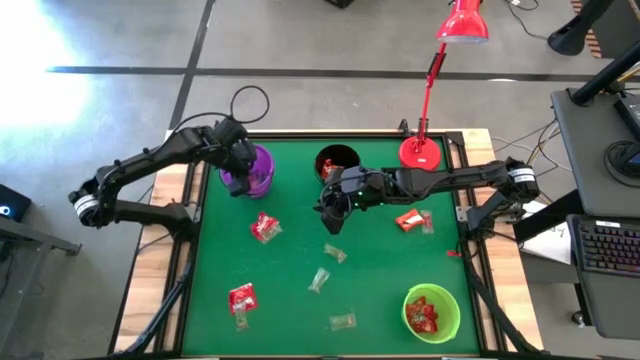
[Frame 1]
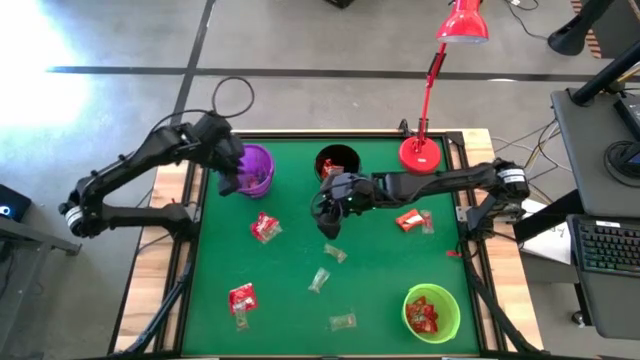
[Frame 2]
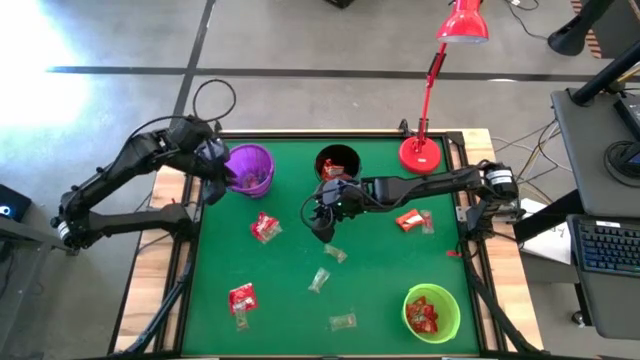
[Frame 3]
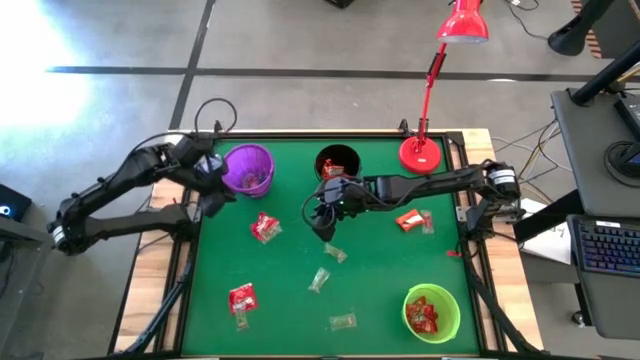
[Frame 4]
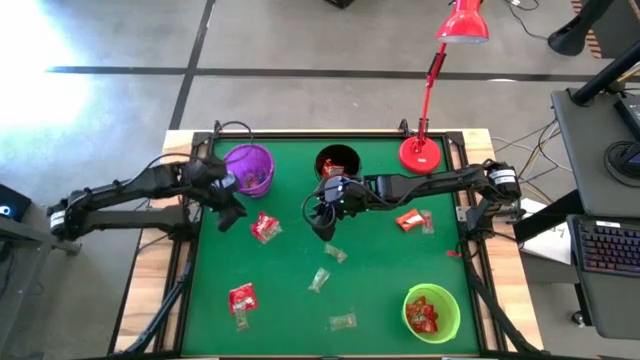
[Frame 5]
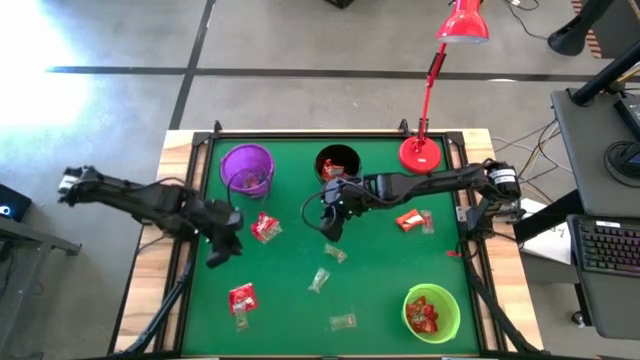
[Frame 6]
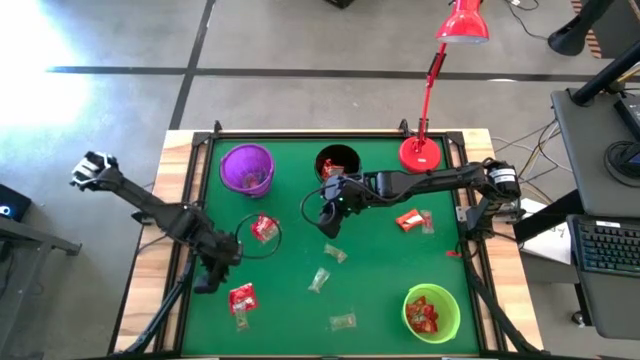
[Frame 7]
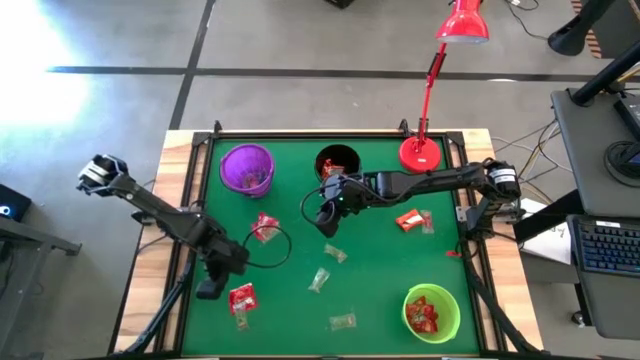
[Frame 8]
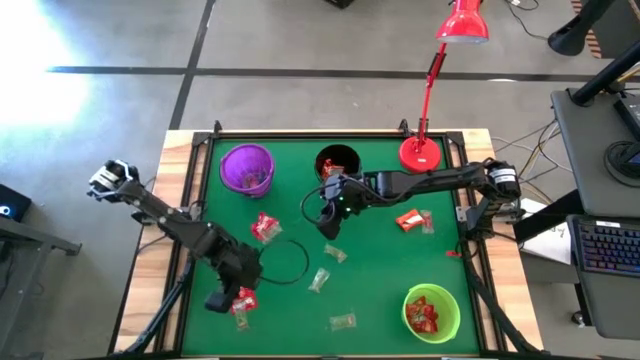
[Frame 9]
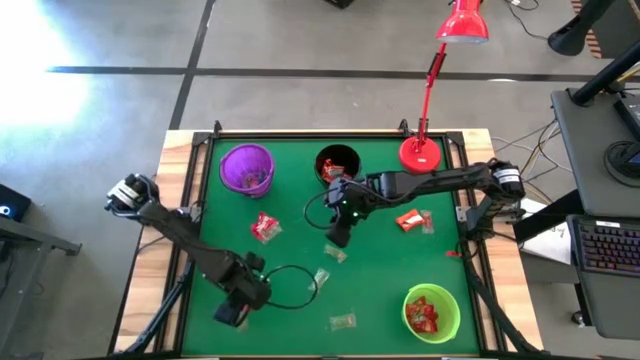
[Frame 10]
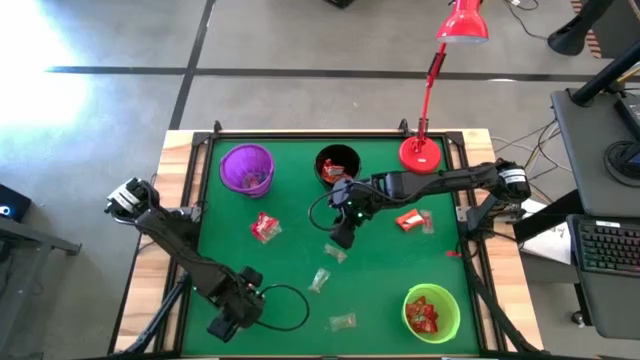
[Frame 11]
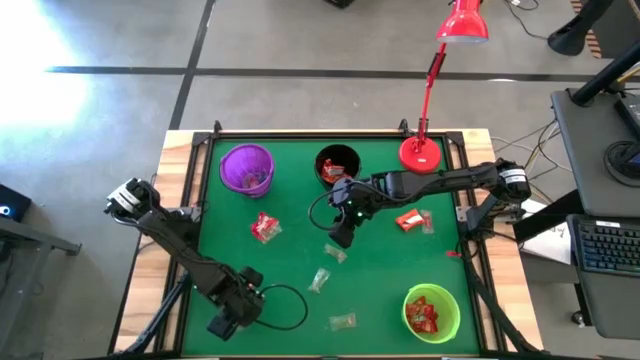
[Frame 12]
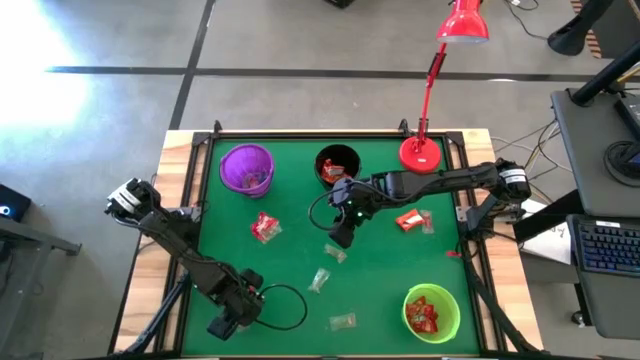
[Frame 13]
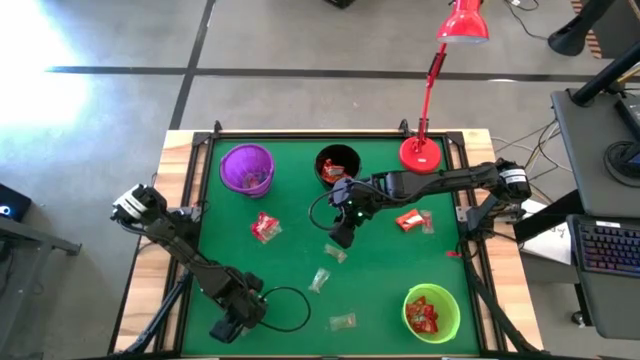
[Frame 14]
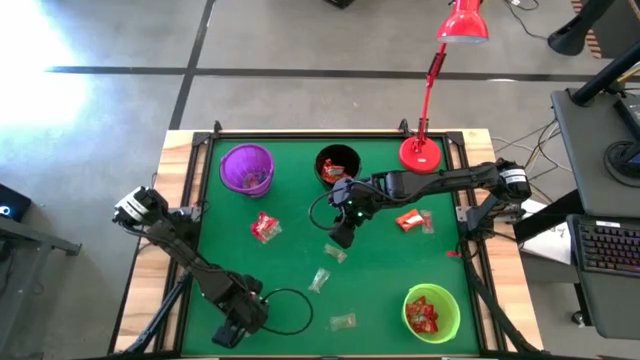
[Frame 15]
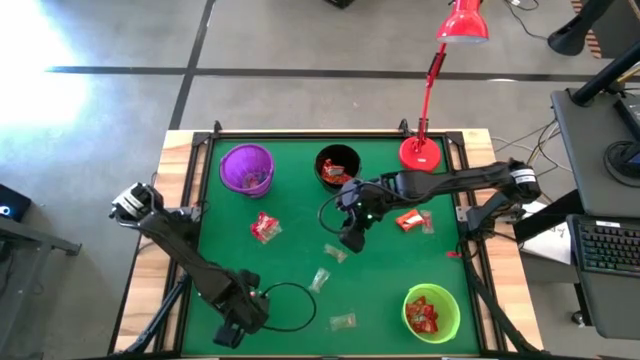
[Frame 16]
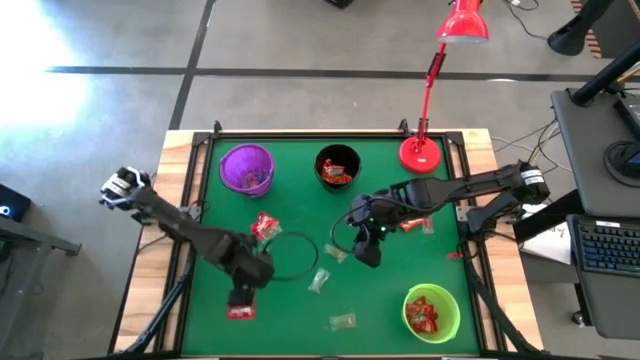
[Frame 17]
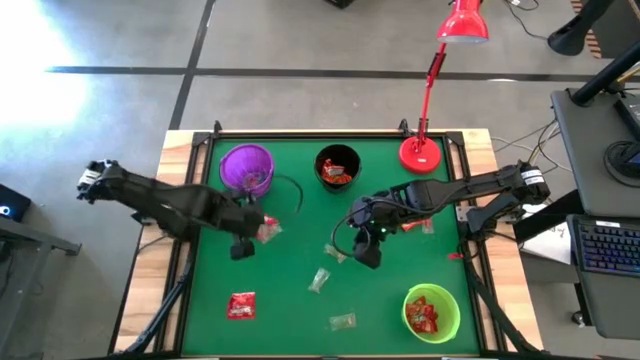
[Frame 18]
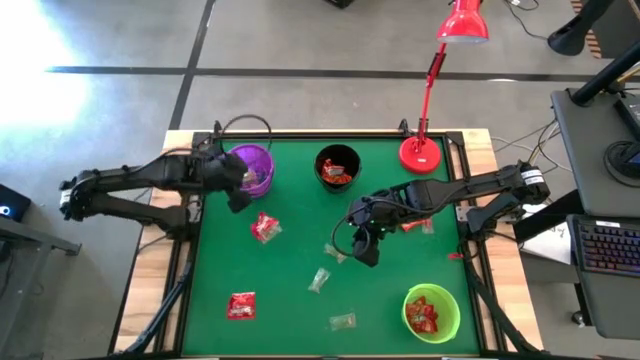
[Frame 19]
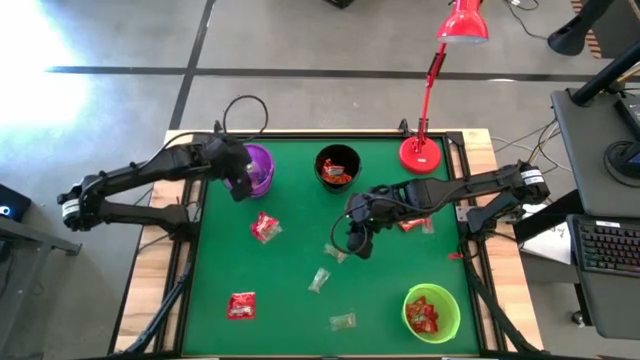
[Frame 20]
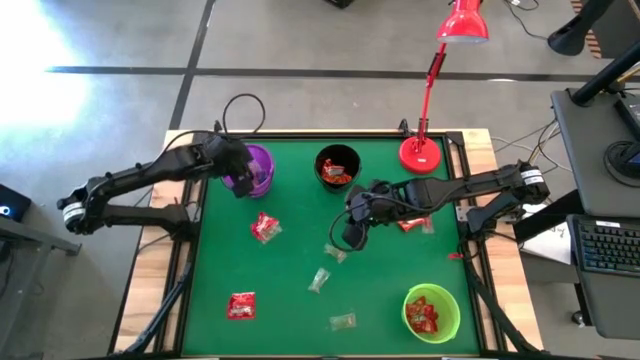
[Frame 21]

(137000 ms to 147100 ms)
Task: Sort candy
Put the green gummy into the violet bucket

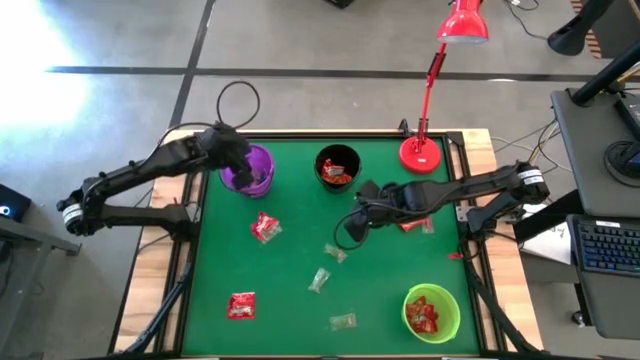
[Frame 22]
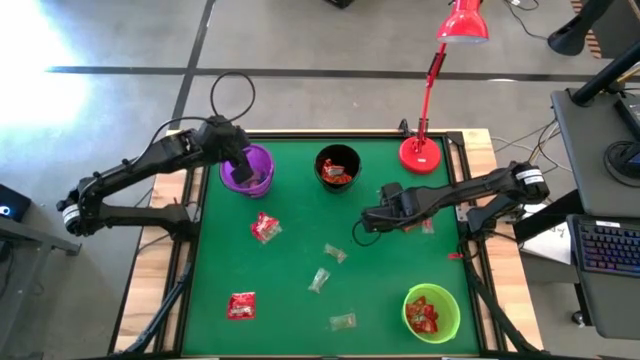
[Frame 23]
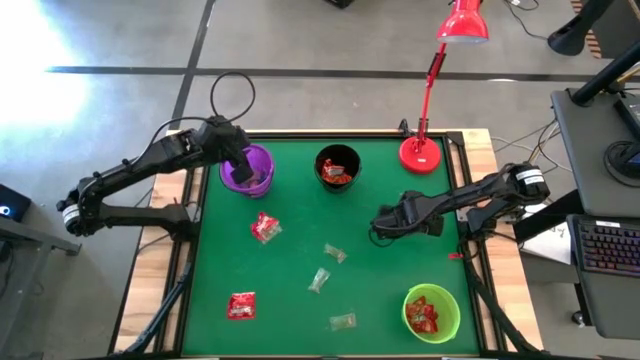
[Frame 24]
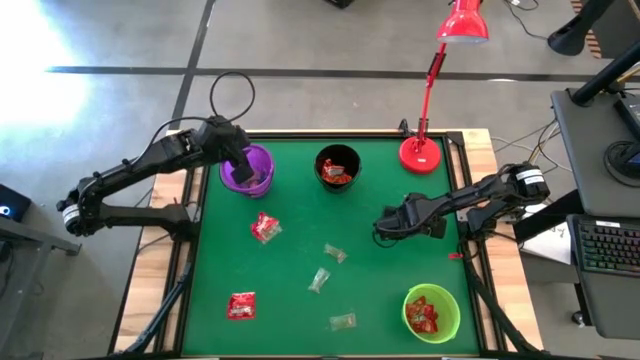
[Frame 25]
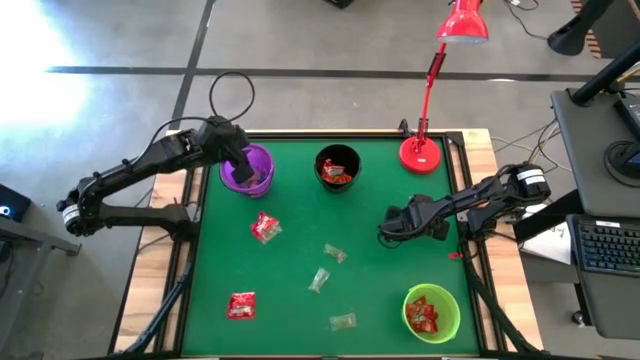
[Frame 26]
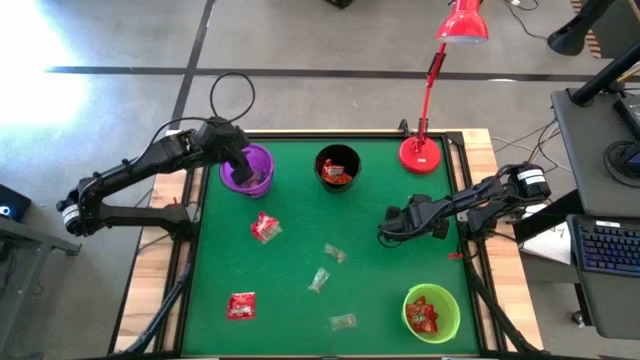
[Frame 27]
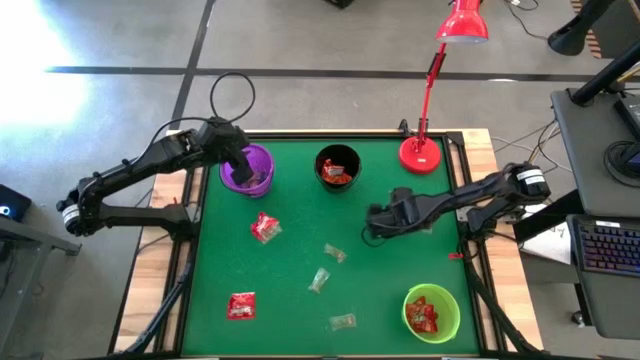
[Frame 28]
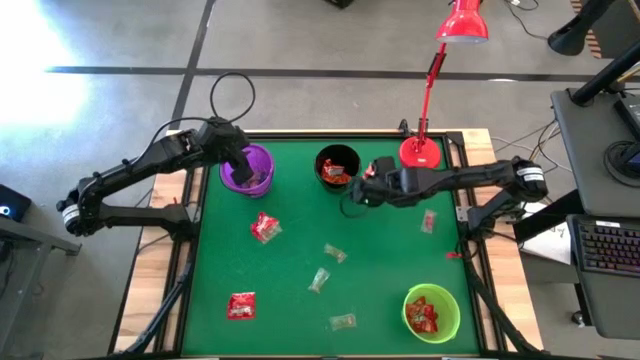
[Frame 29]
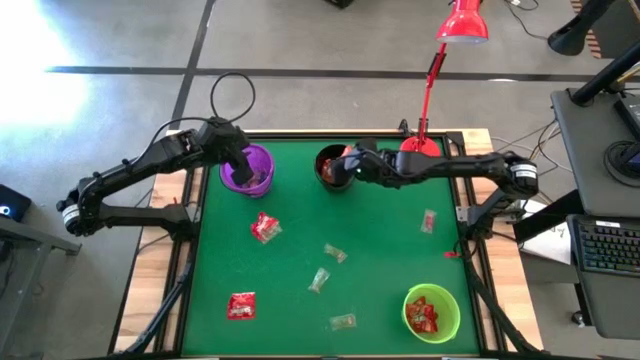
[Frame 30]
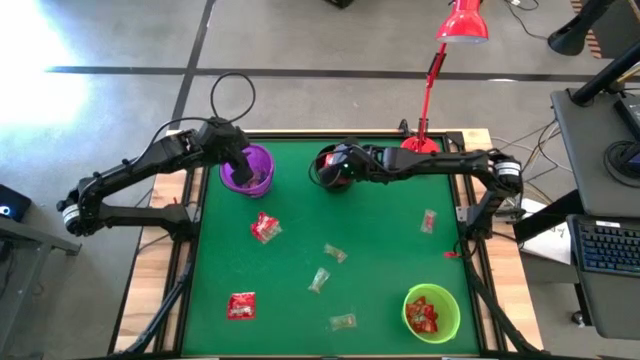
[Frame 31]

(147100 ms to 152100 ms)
Put the orange chocolate into the black bucket

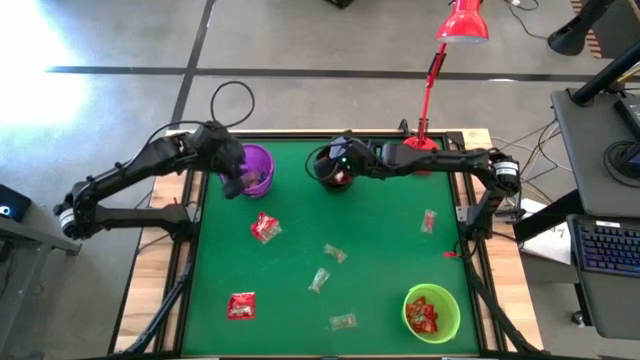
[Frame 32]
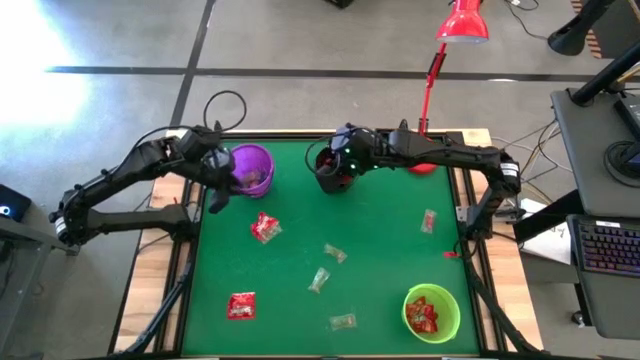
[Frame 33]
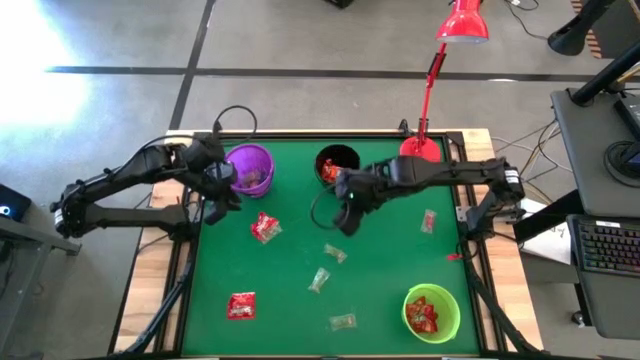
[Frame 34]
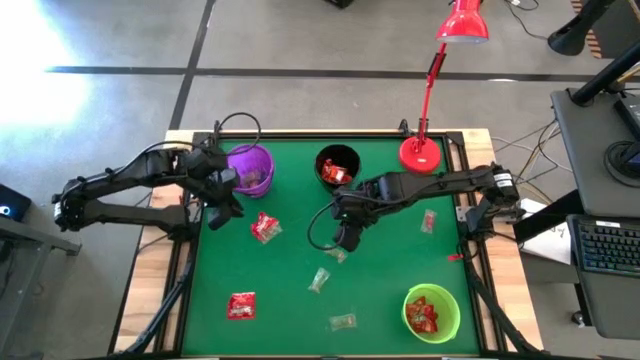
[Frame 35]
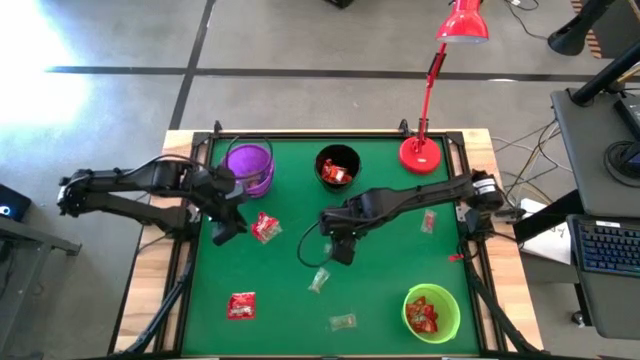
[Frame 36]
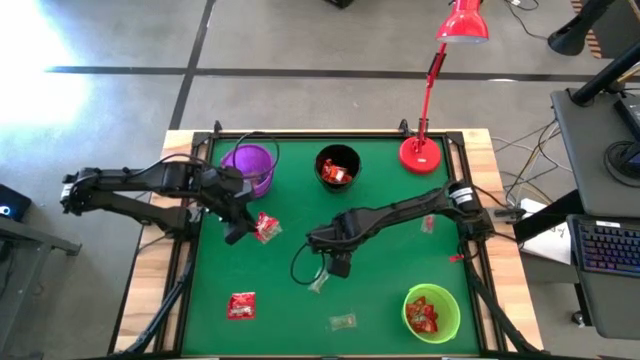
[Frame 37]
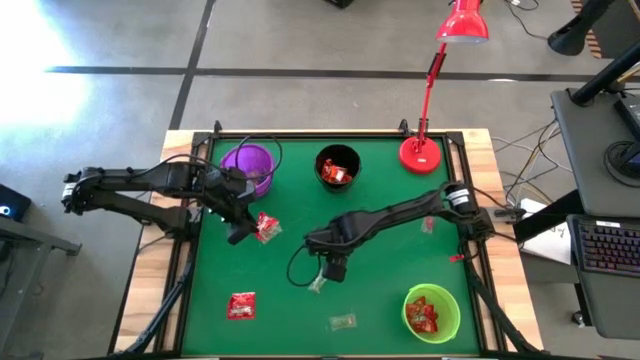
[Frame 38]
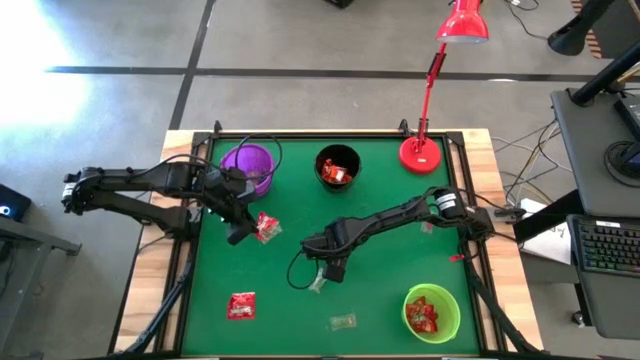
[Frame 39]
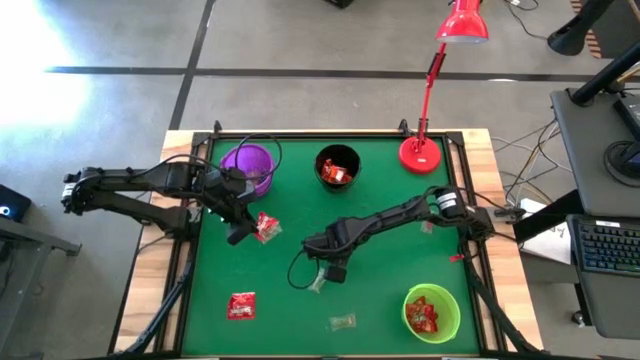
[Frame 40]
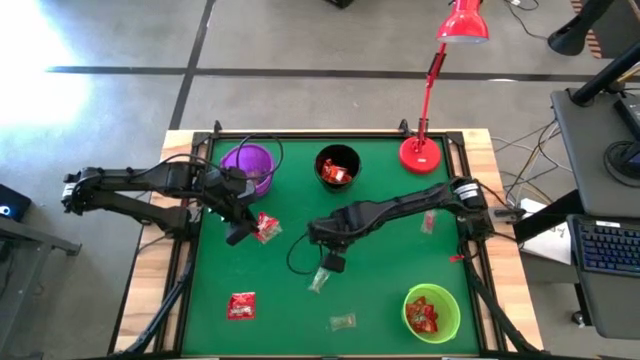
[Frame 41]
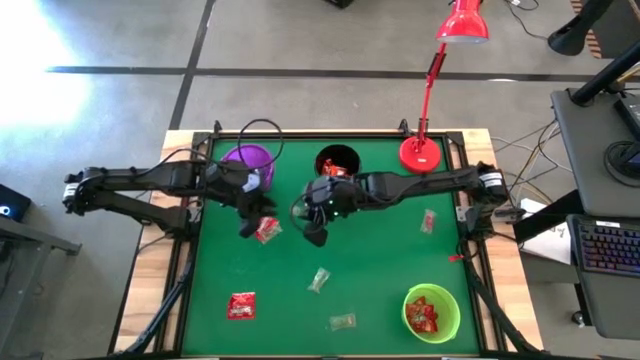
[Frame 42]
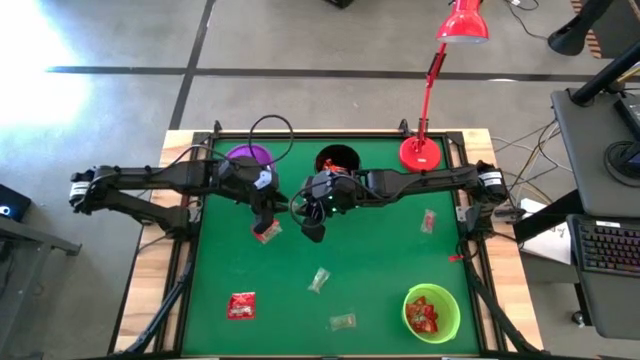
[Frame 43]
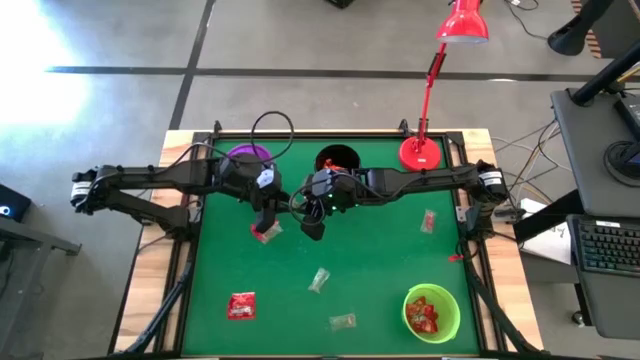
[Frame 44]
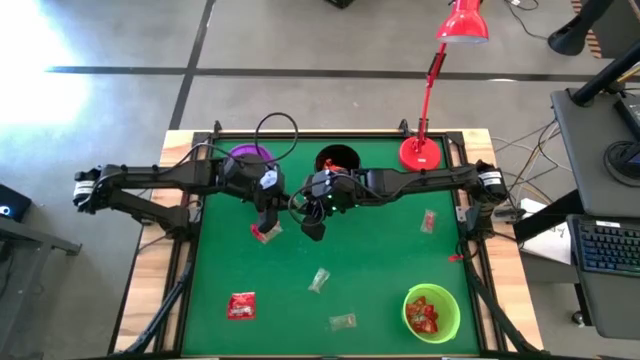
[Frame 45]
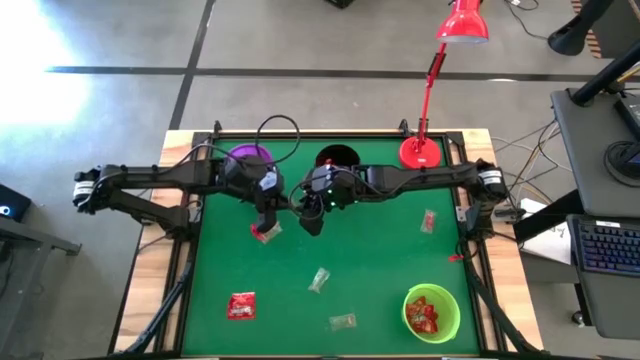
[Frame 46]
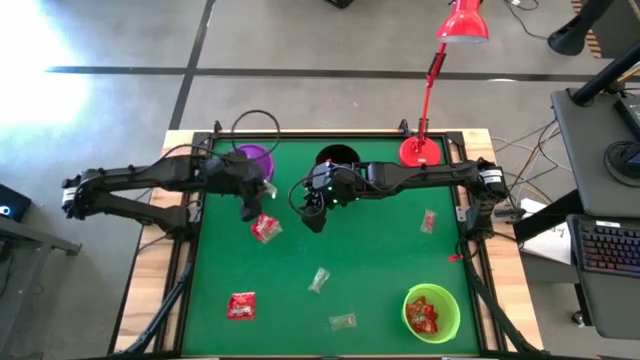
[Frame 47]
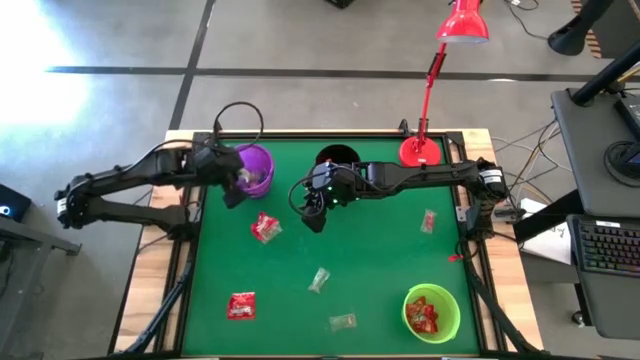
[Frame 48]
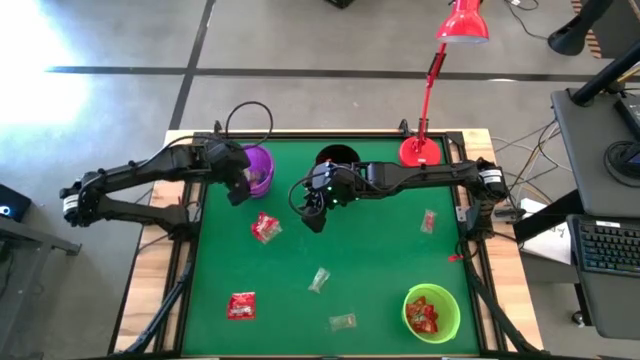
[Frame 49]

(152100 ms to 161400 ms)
Put the green gummy into the violet bucket
